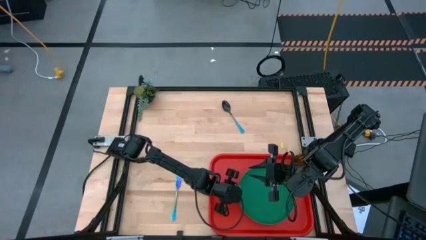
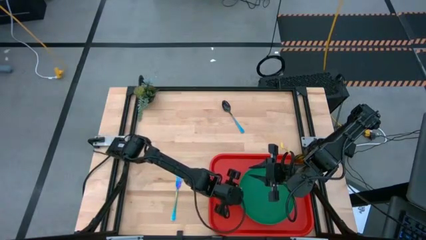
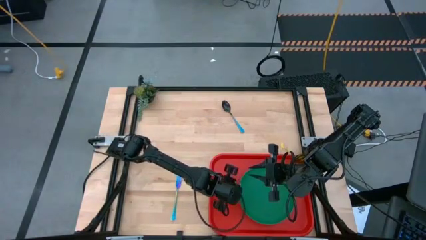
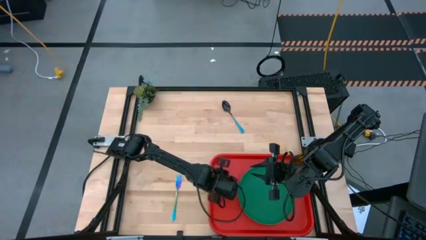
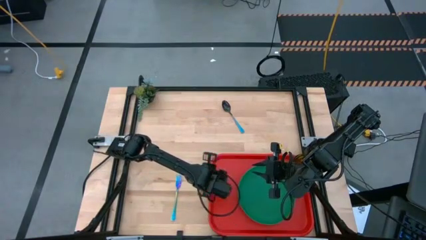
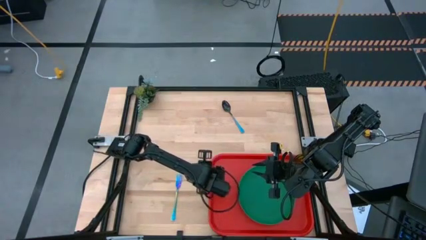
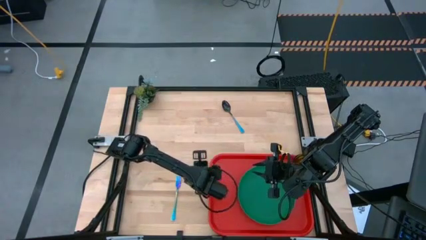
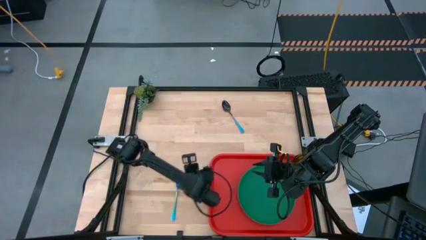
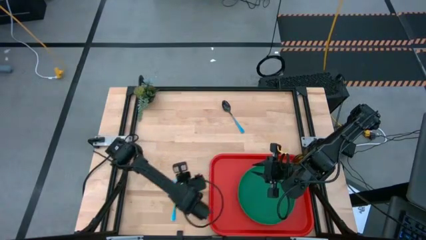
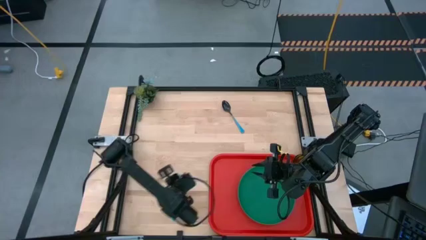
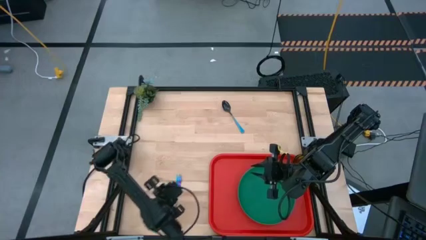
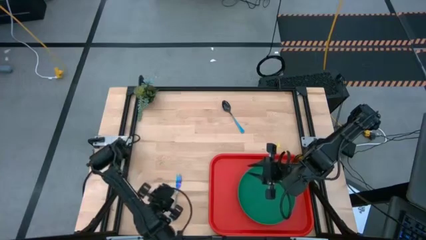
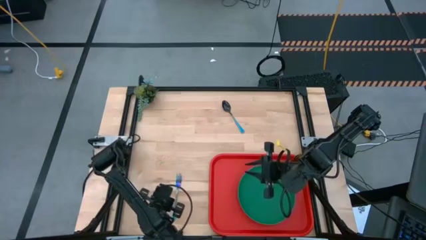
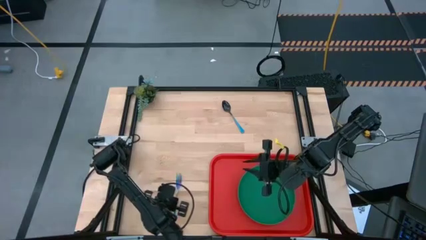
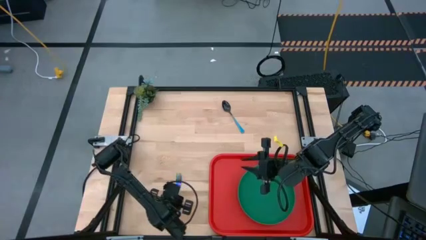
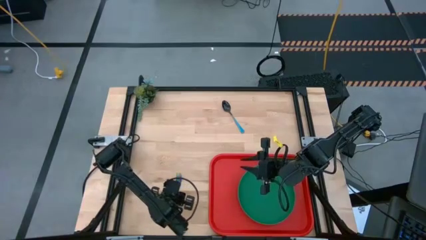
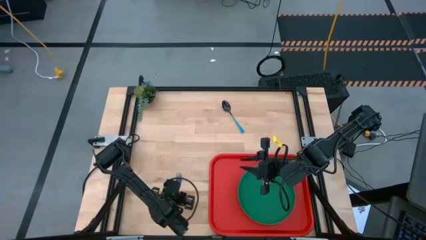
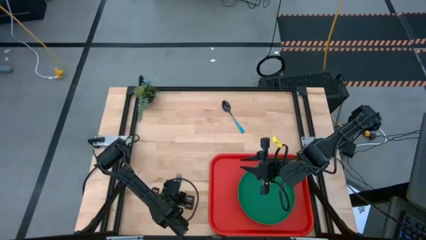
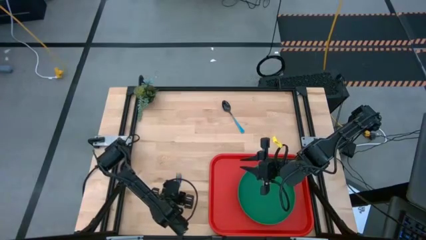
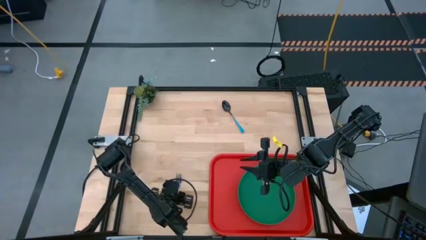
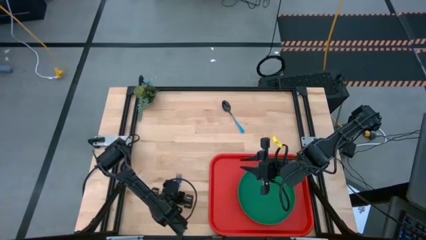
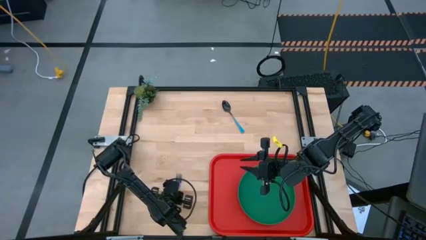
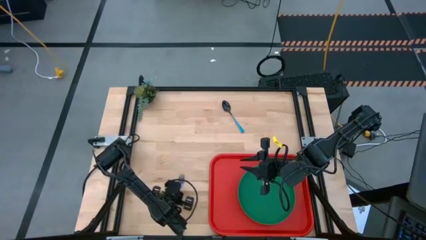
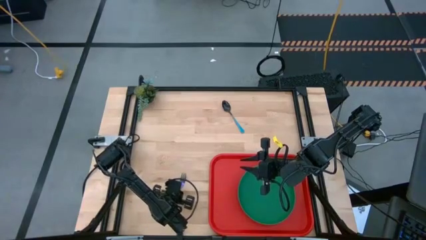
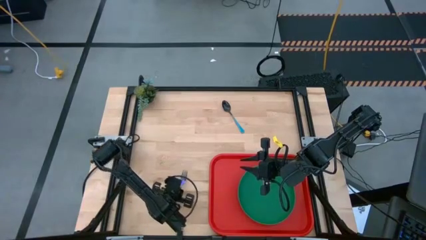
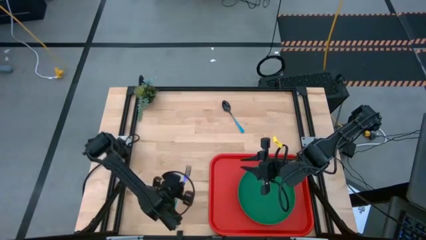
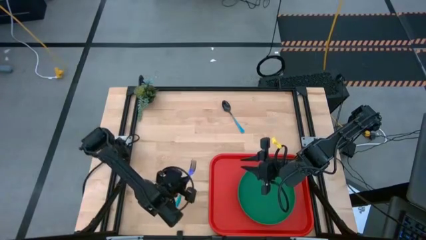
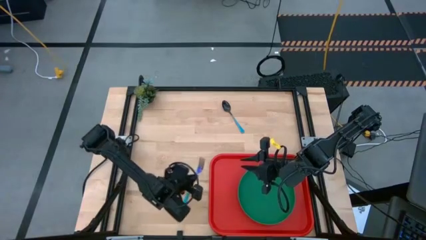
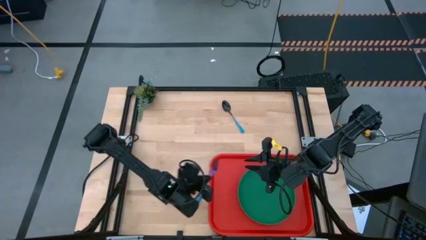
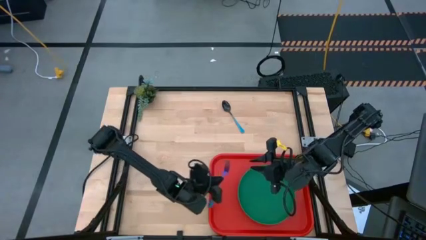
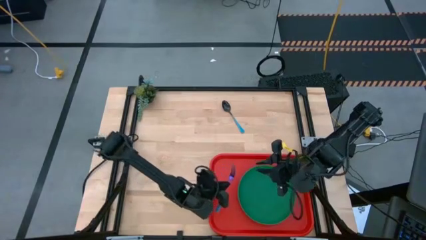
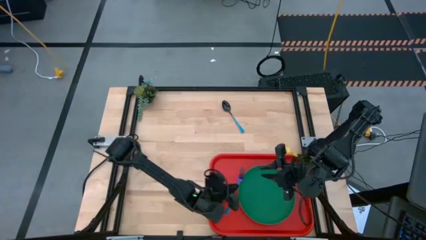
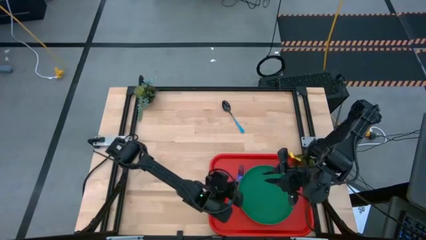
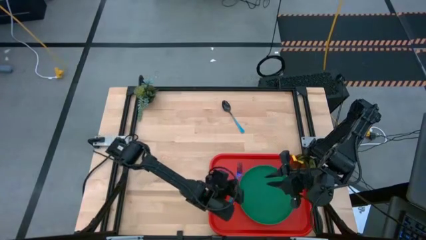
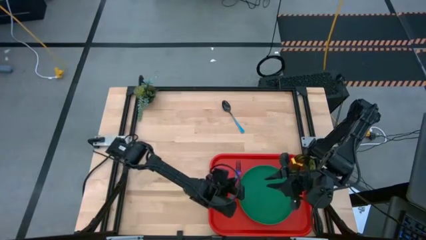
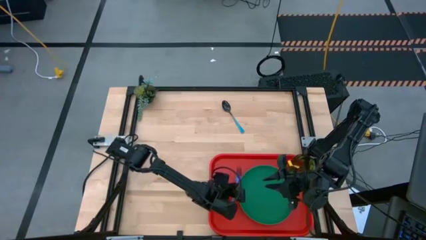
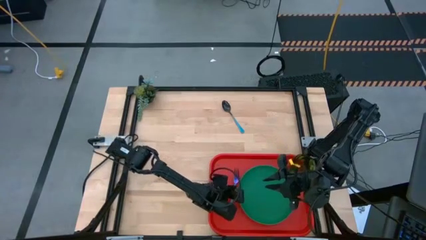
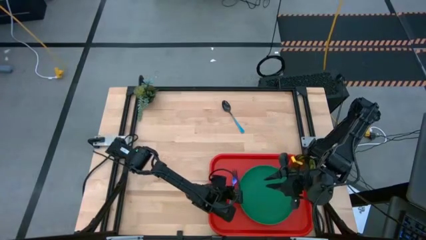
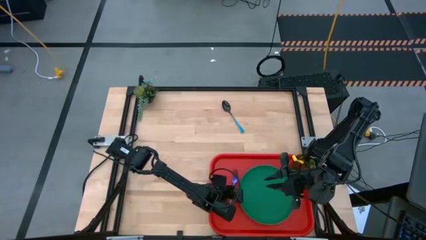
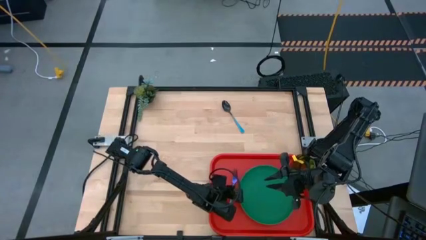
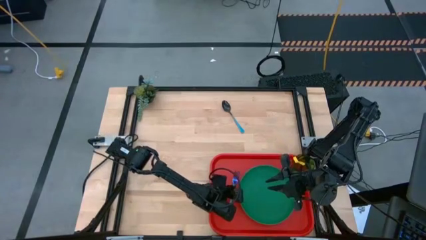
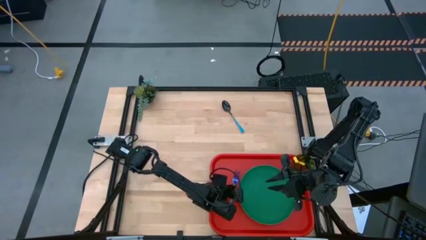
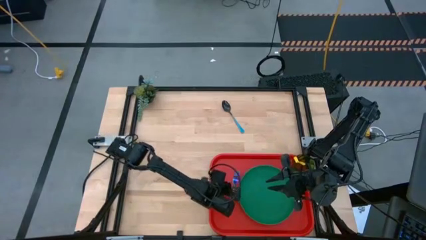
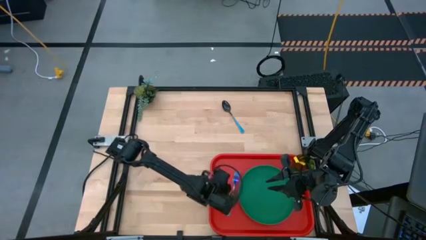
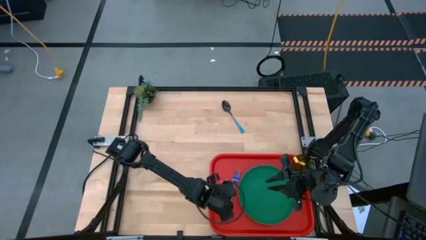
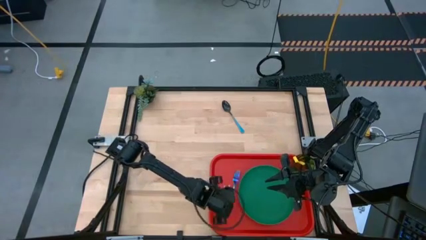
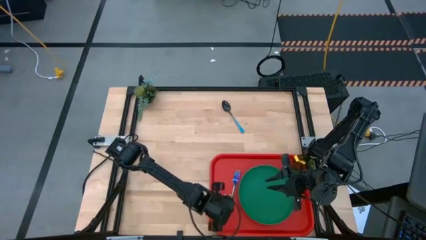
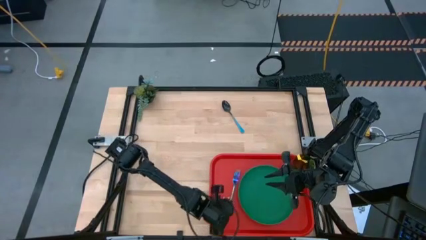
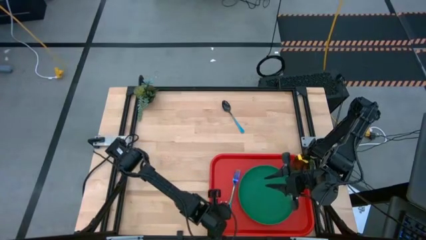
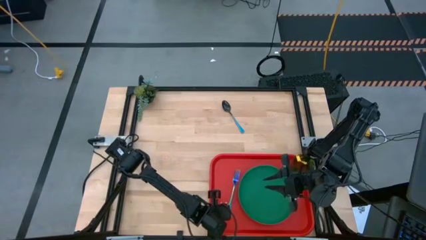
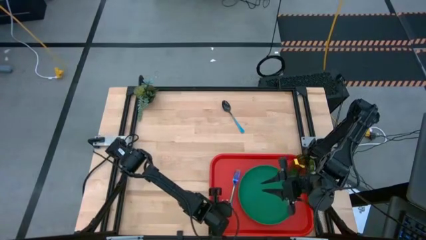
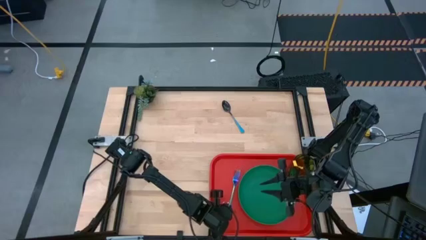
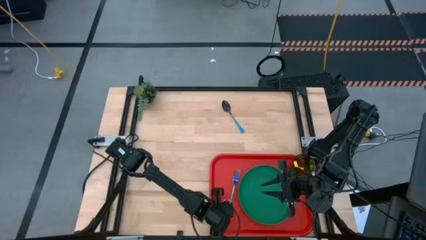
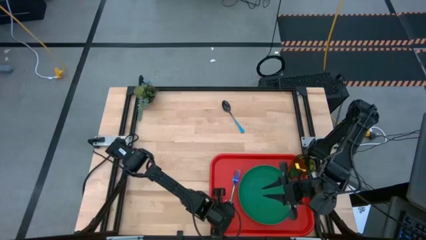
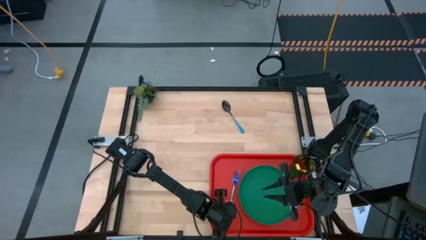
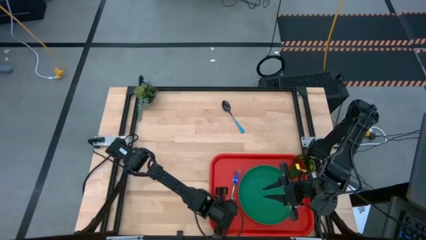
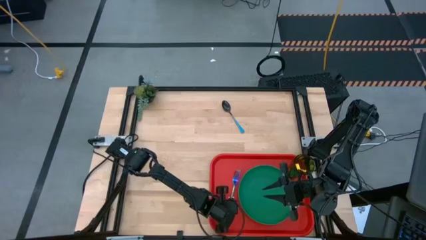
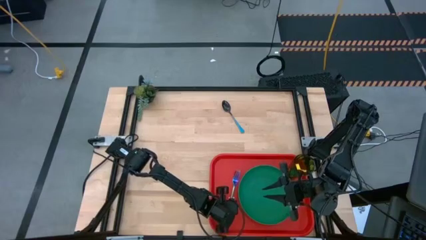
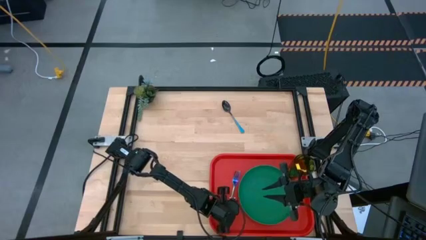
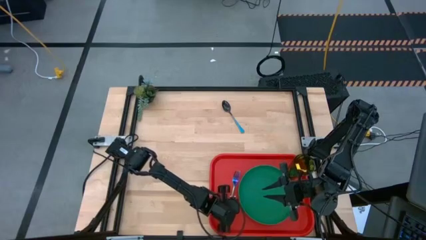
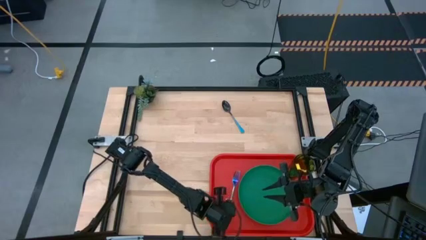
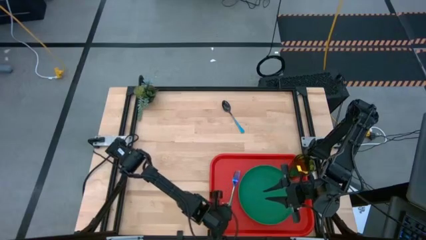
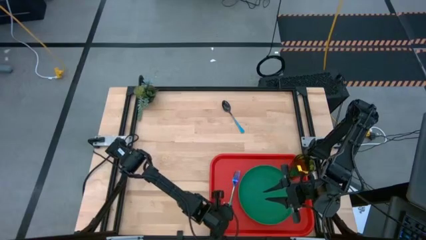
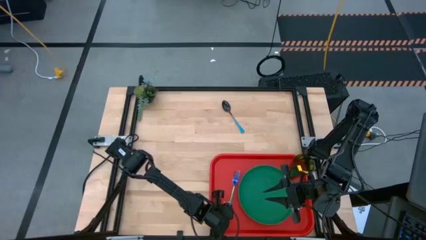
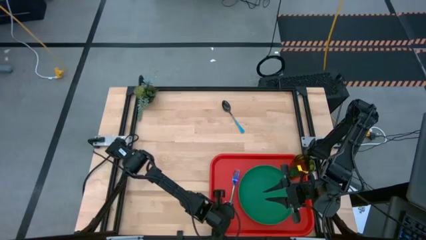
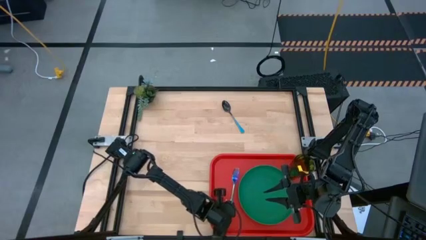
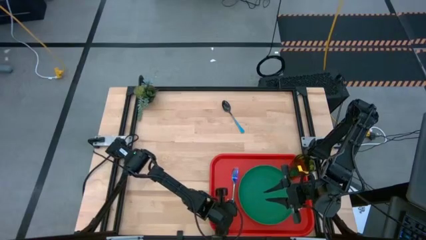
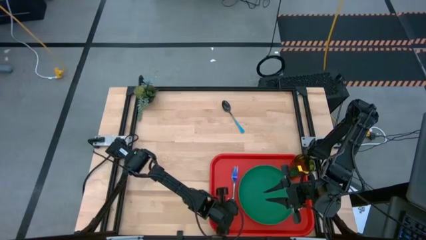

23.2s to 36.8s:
Task: Pick and place plate/cup/fork/spoon on tray
Put the purple fork on the red tray to the left of the green plate

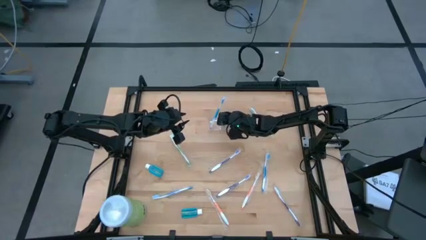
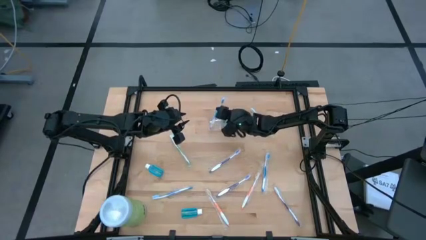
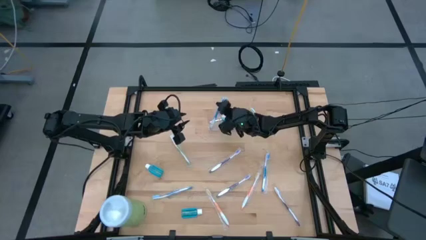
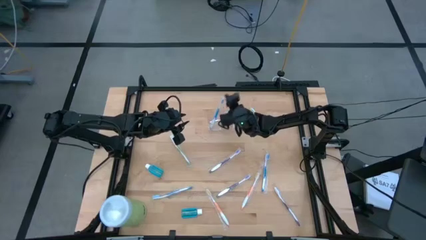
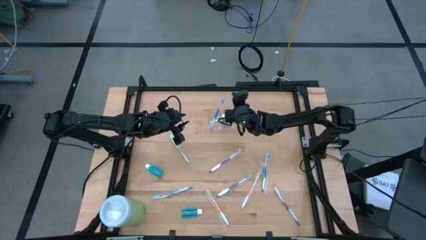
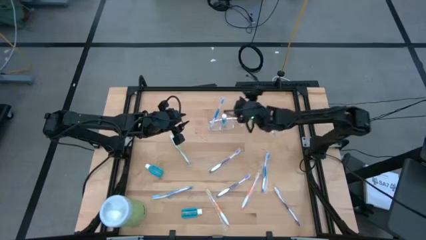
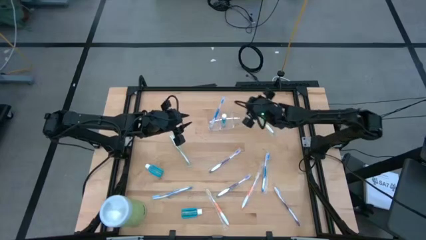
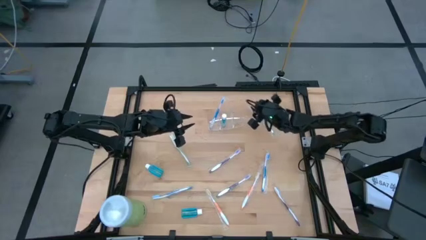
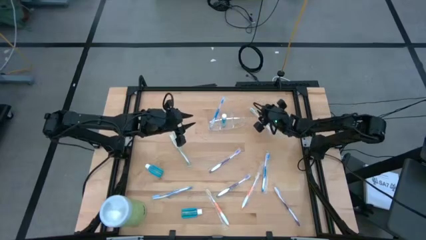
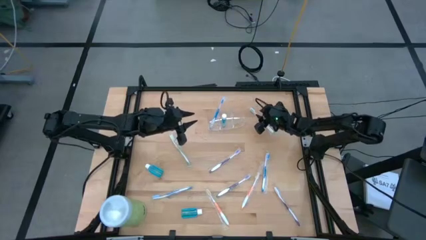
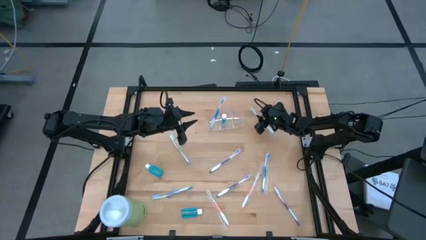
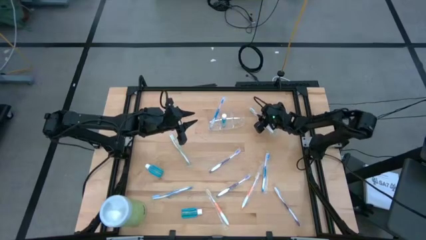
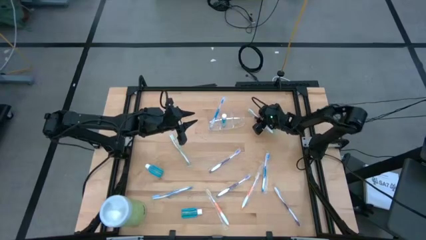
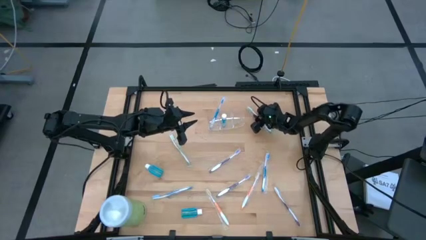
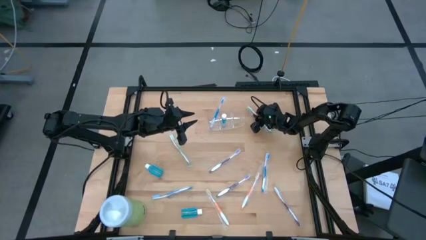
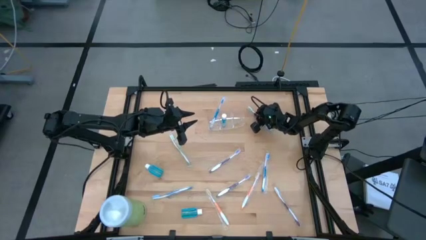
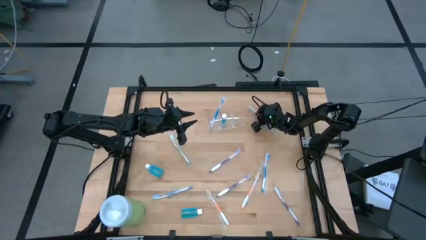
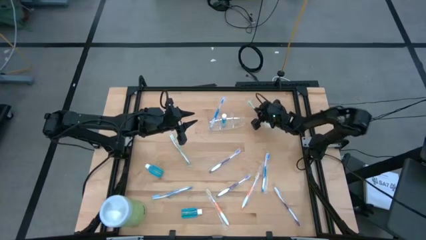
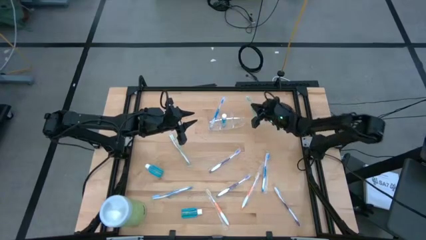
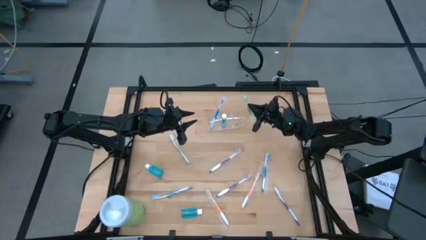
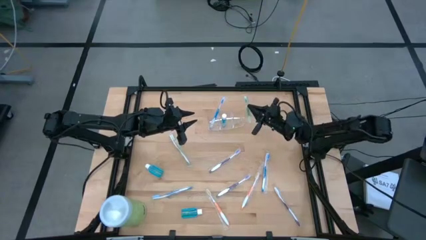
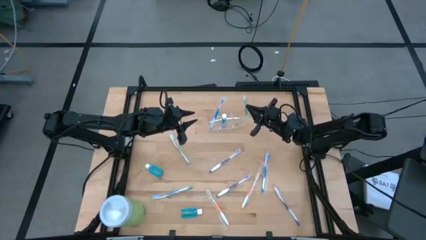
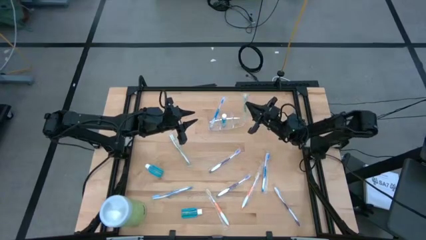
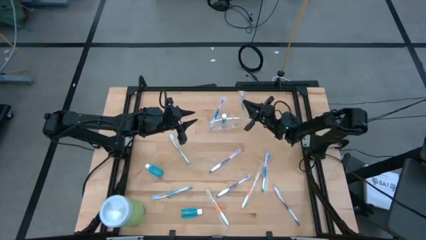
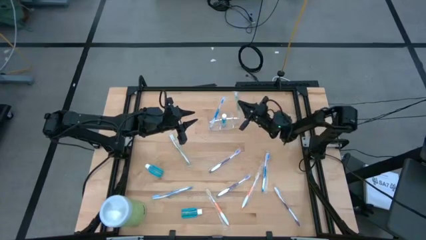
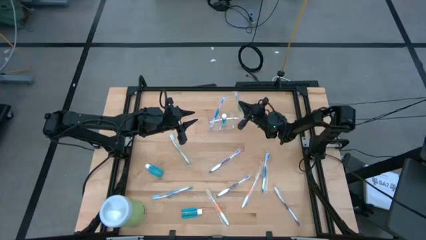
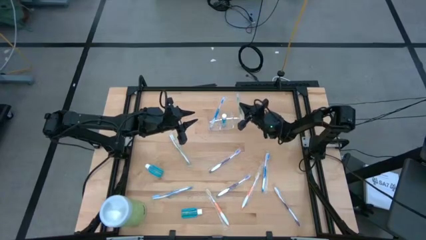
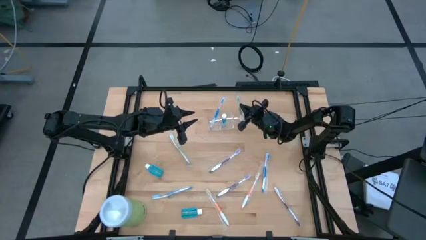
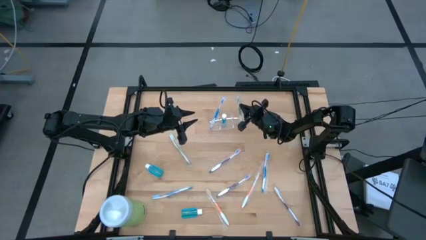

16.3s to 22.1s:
Task: Pick & Place toothbrushing station
Put the right green toothbrush into the transparent organizer
